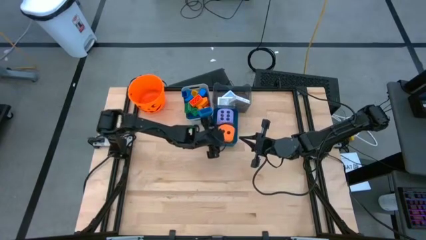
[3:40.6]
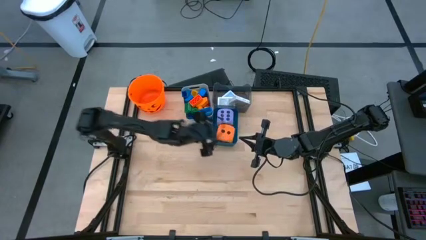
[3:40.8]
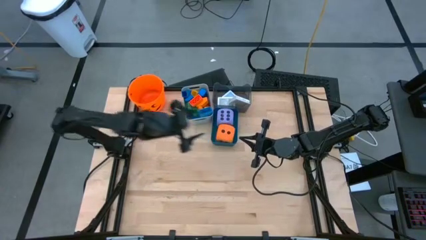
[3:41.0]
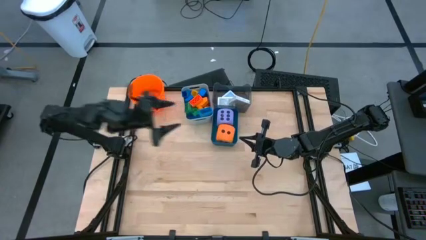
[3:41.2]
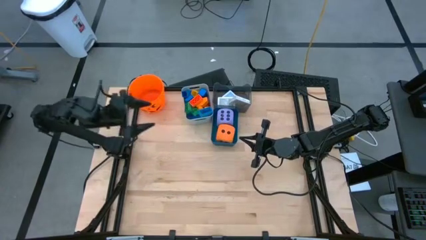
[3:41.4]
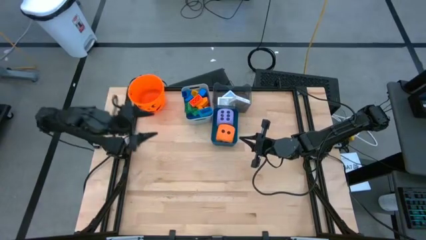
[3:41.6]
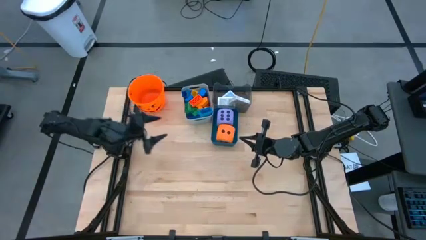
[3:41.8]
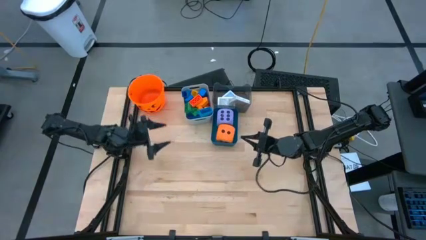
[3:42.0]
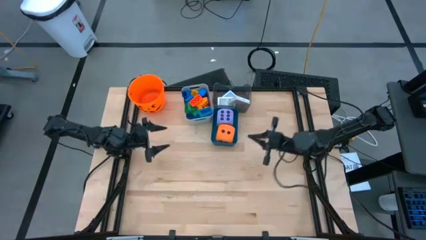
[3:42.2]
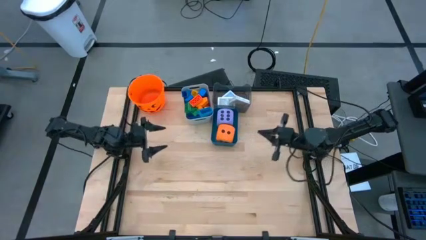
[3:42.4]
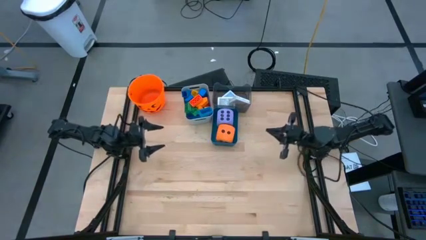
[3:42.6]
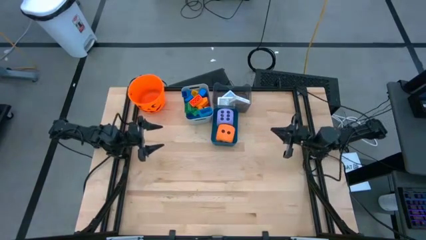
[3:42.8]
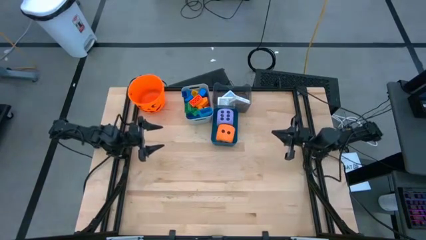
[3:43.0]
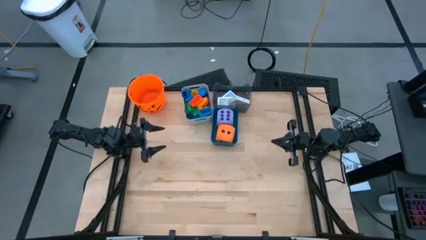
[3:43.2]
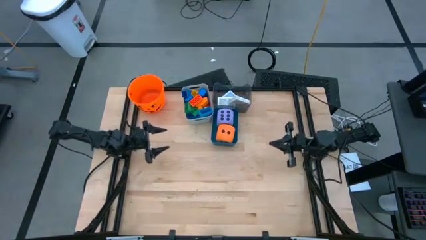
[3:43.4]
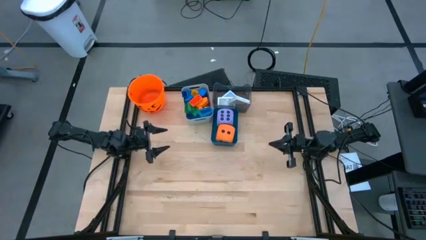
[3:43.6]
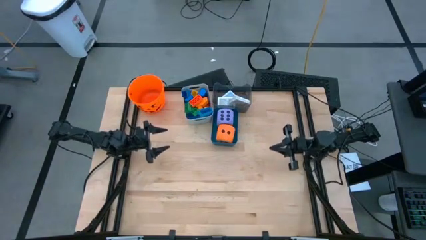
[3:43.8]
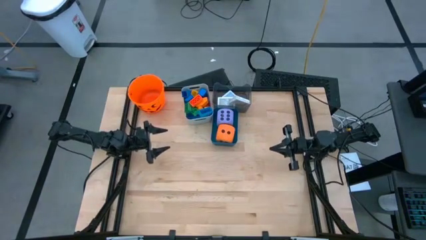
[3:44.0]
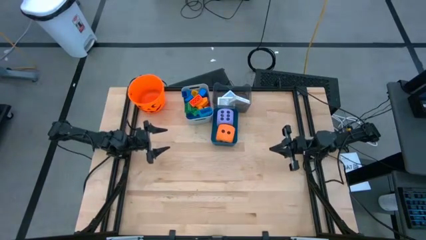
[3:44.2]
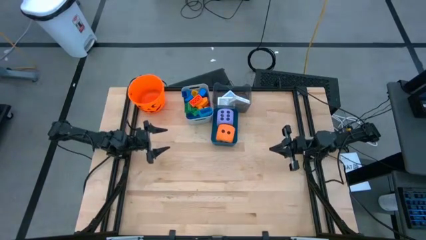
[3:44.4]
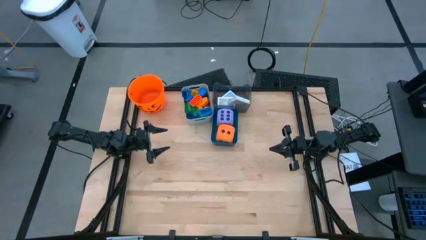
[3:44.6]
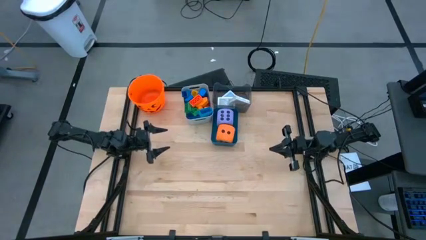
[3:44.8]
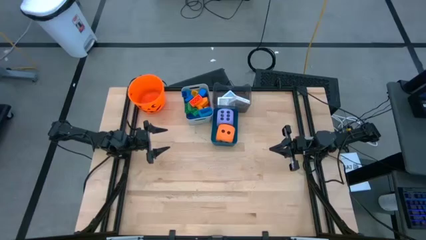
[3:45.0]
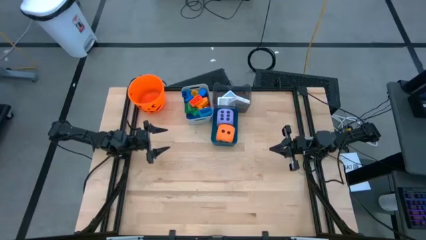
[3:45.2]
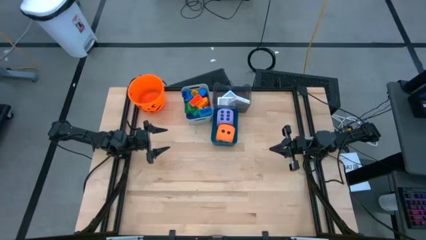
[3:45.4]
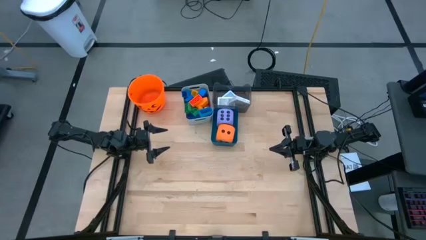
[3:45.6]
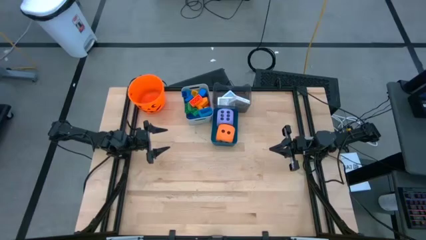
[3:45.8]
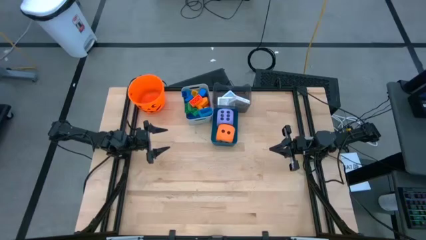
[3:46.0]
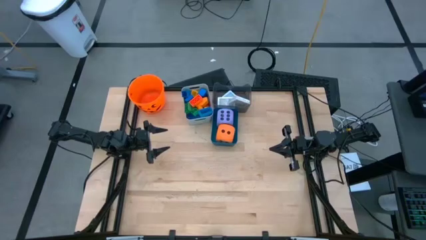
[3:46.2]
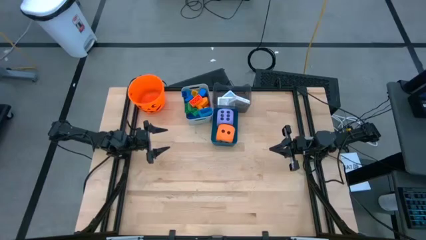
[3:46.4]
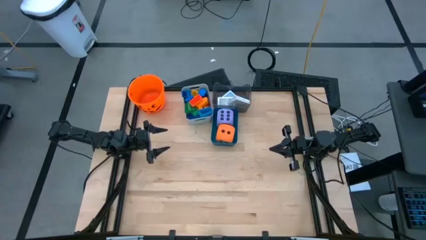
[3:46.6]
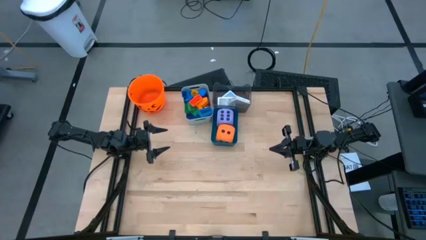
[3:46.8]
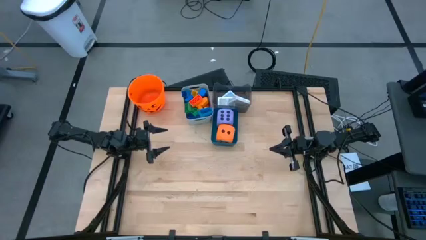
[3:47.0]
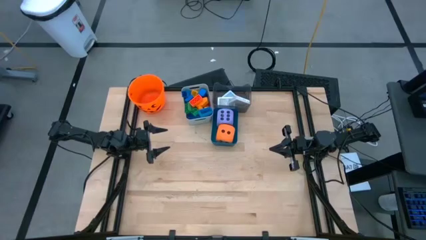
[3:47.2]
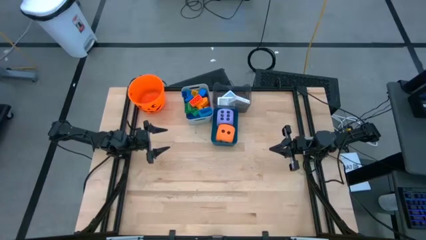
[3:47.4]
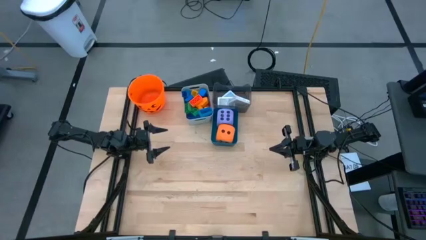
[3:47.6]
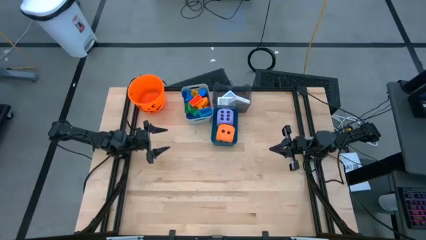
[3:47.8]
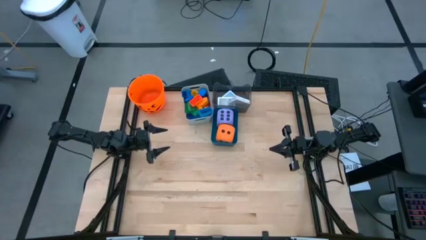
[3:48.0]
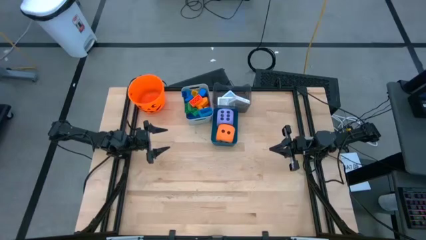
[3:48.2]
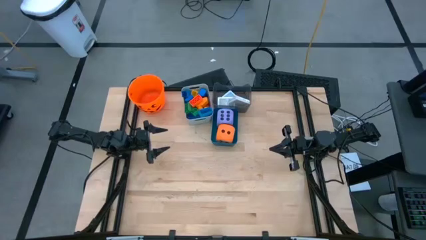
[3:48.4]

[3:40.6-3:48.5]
Task: Pick & Place Toys
Return to Home Position

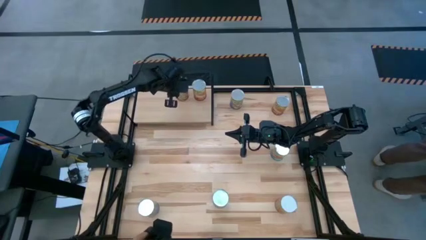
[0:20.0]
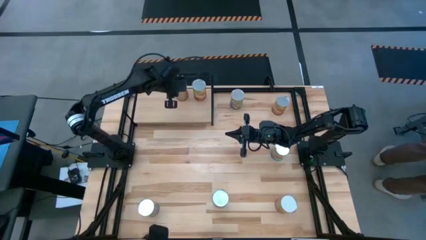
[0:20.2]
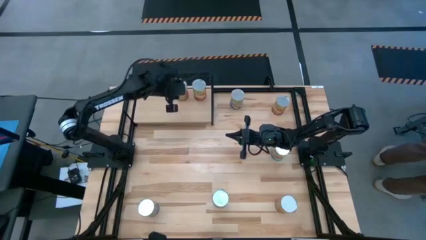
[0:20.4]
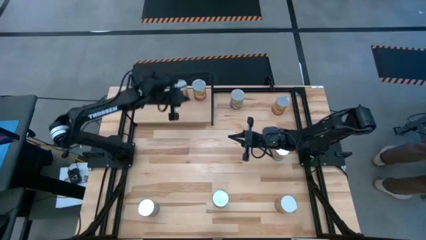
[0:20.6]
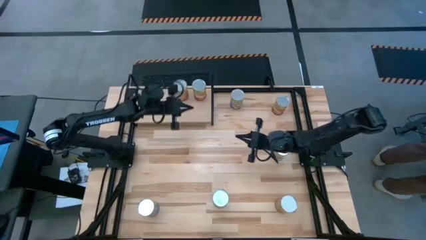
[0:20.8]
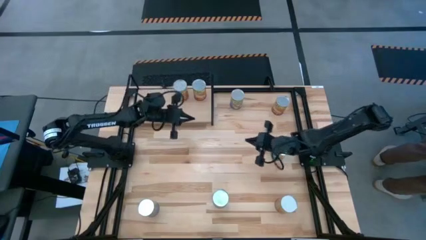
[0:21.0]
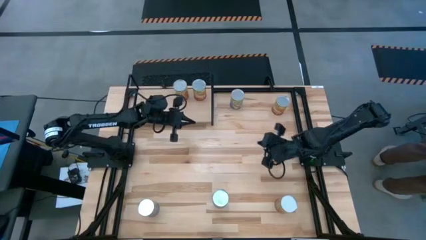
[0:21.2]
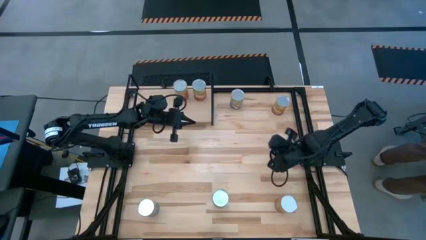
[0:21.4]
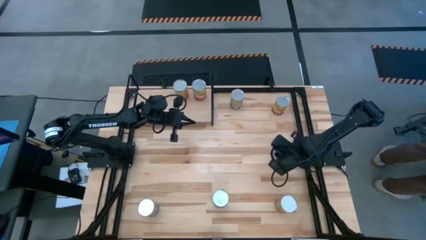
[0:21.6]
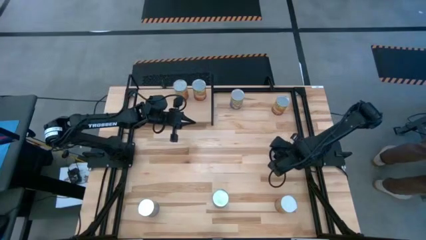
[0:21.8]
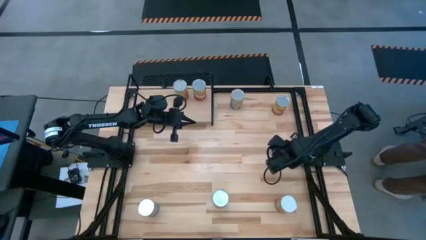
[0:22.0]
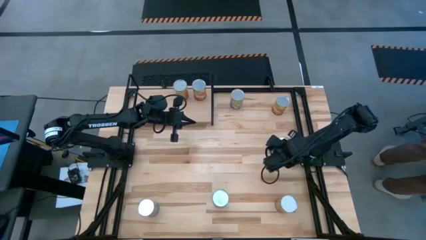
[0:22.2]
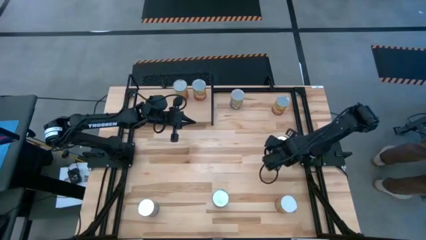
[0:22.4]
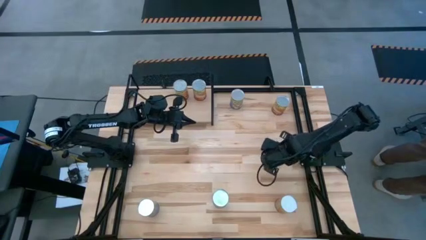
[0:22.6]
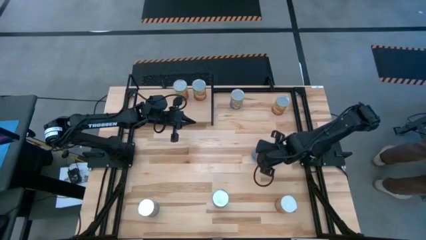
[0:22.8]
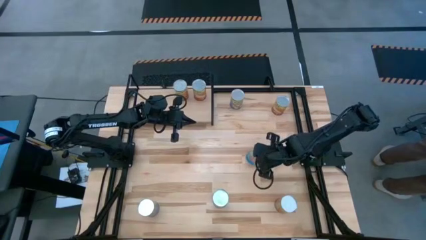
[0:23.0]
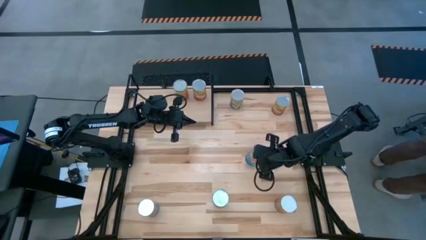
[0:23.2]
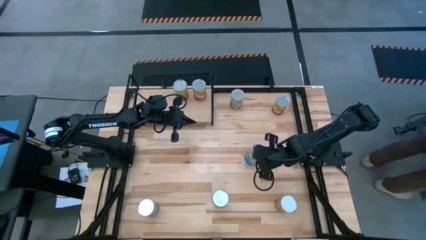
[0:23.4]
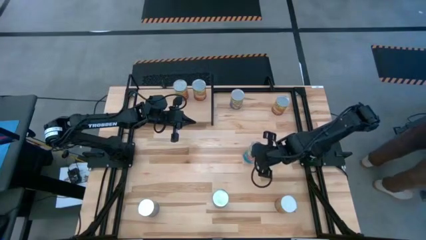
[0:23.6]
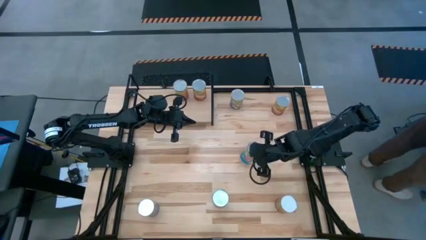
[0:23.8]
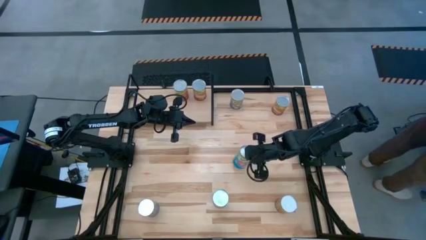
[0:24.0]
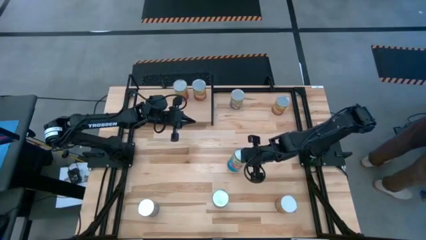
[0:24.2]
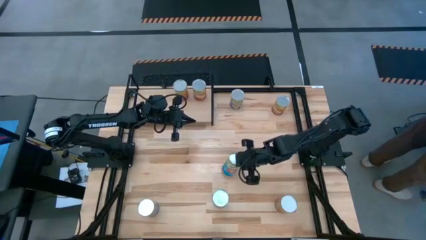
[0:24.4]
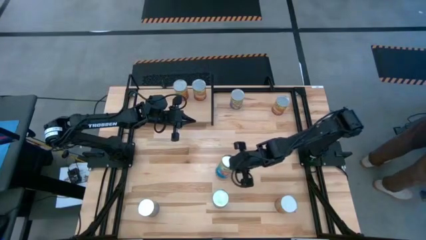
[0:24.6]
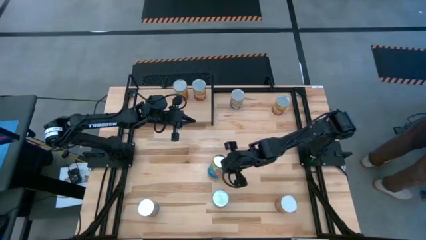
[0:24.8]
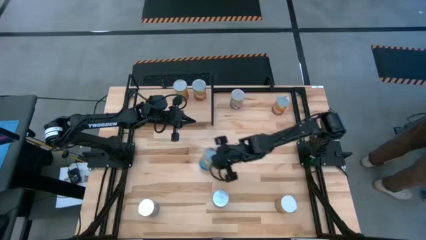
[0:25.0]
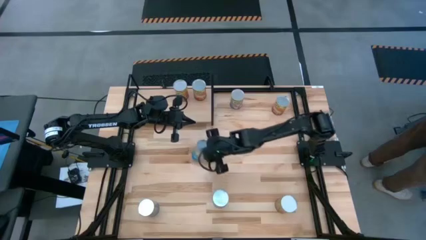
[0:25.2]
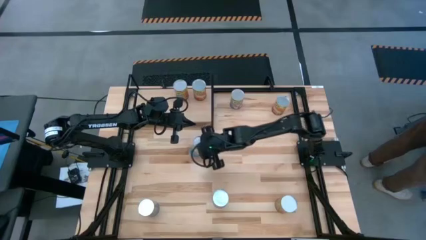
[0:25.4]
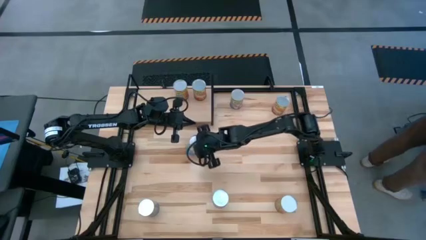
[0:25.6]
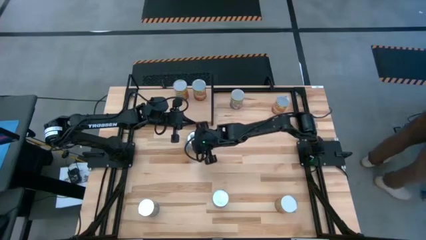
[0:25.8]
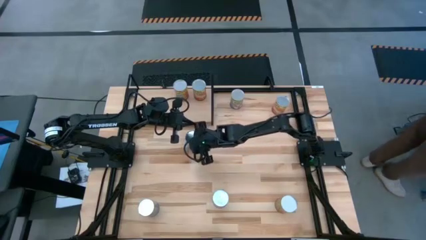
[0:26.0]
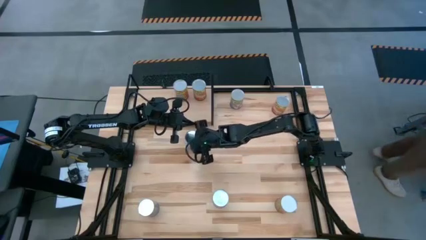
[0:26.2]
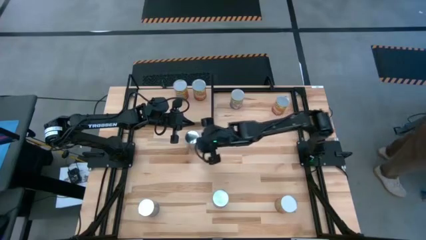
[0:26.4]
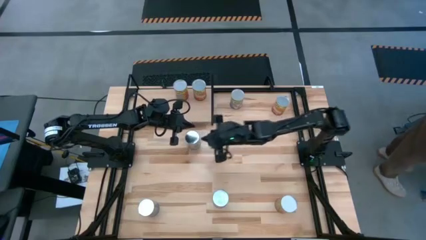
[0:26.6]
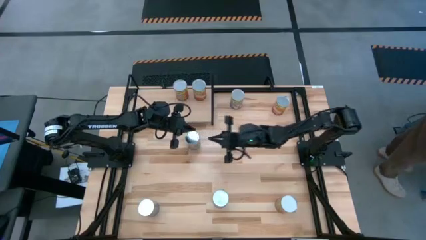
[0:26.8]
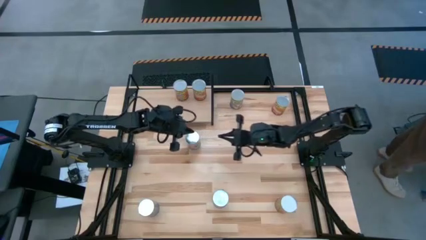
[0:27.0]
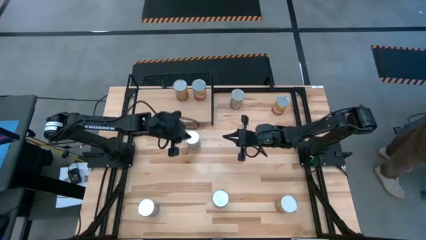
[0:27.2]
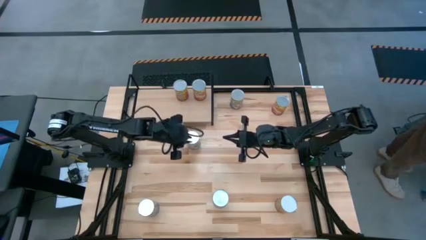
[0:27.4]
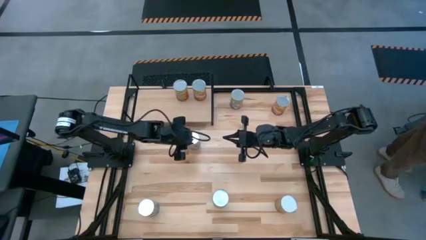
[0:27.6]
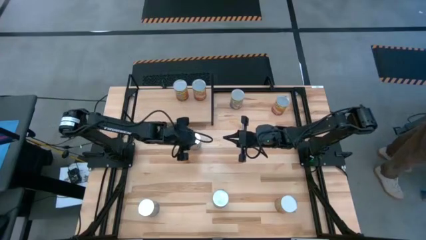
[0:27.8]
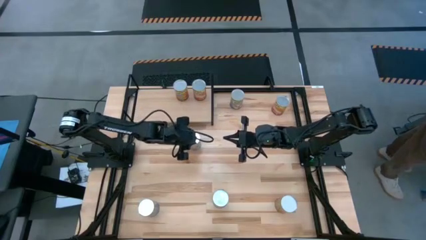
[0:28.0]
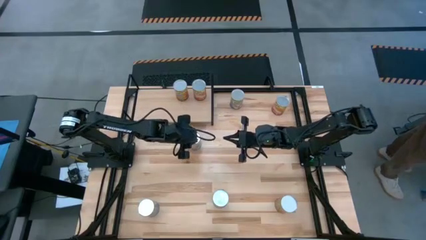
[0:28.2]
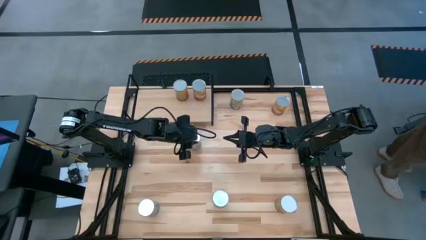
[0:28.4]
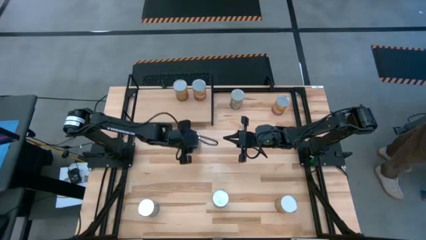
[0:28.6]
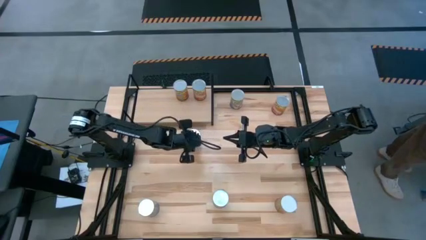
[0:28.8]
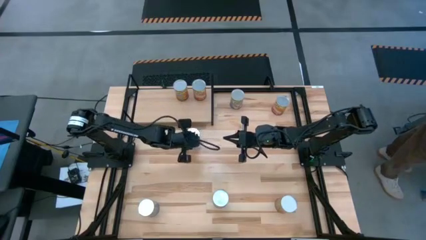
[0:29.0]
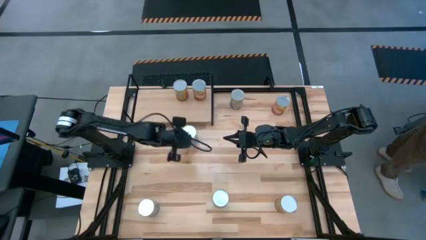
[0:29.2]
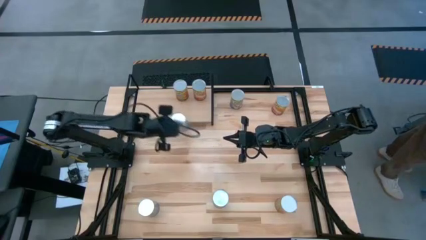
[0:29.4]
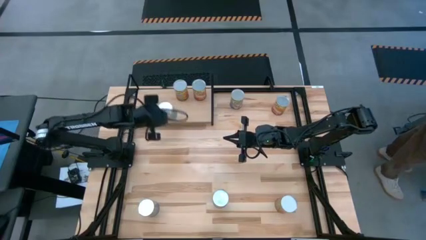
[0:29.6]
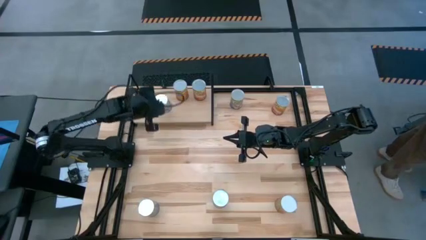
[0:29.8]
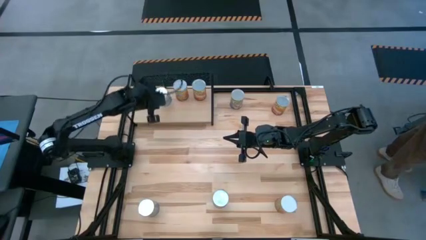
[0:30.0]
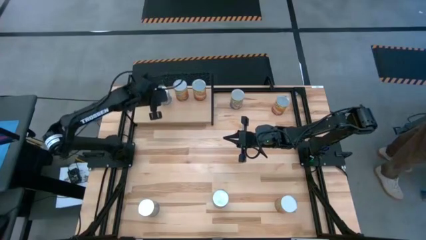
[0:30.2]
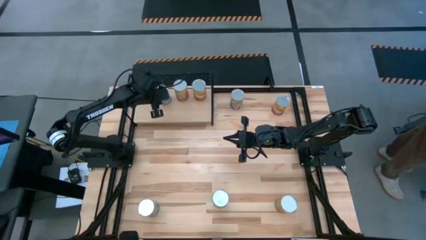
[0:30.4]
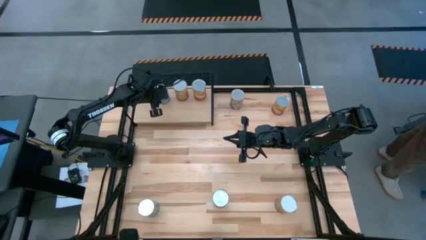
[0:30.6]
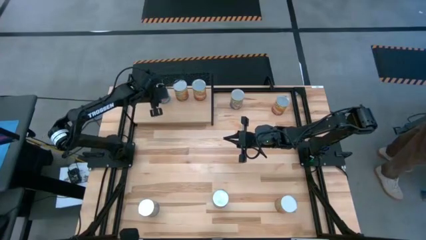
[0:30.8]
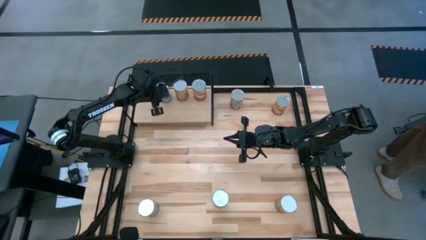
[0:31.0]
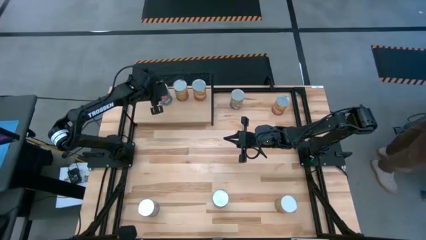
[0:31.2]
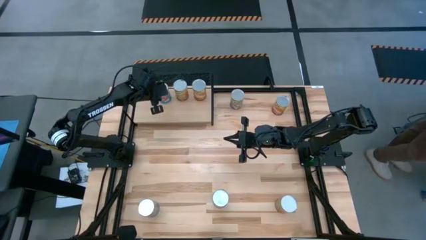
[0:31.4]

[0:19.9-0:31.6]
Task: Pick and place cans onto a shelf
Put the right canned tomatoes on the shelf
